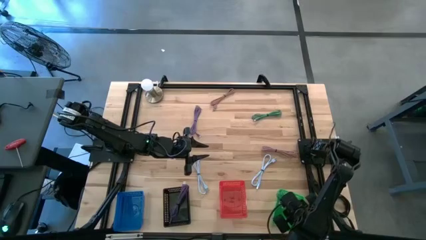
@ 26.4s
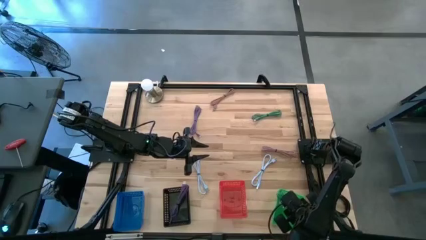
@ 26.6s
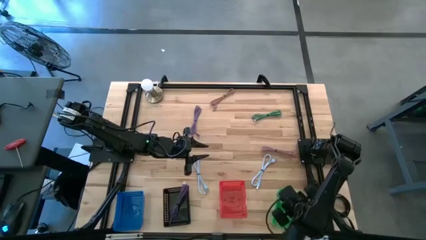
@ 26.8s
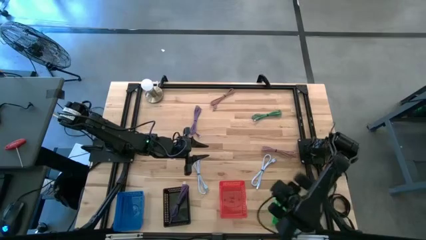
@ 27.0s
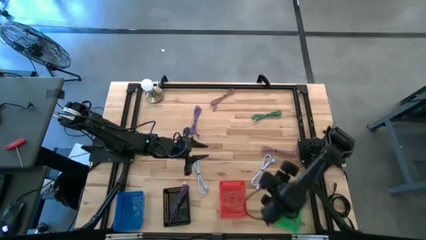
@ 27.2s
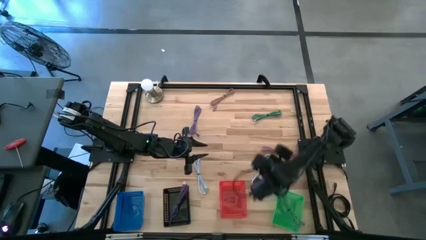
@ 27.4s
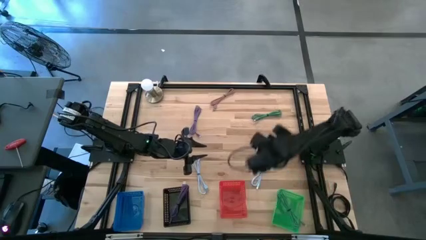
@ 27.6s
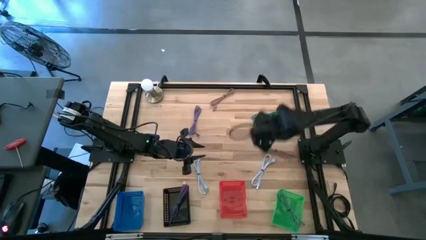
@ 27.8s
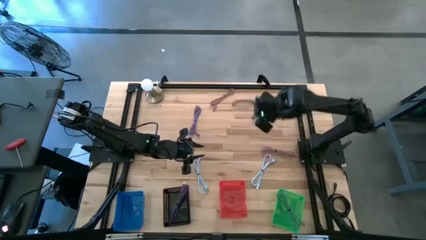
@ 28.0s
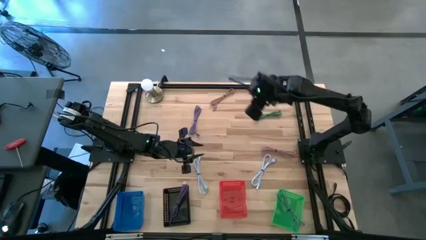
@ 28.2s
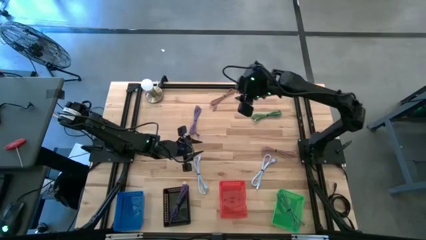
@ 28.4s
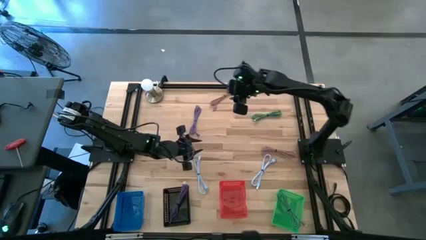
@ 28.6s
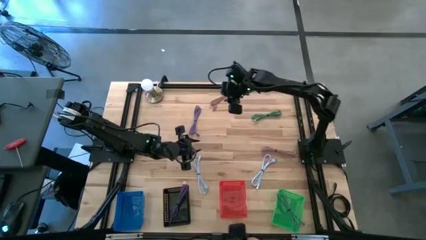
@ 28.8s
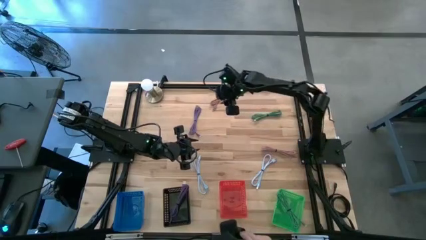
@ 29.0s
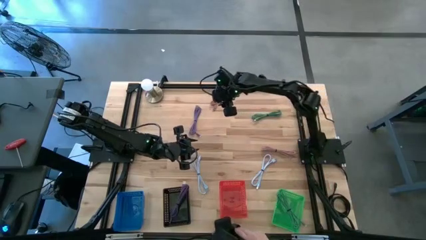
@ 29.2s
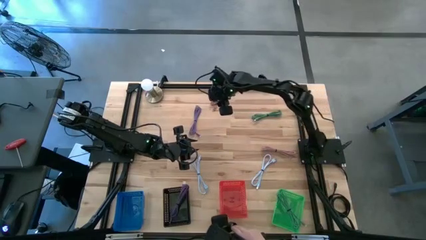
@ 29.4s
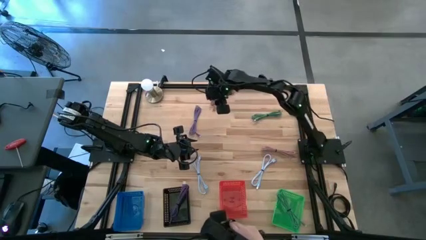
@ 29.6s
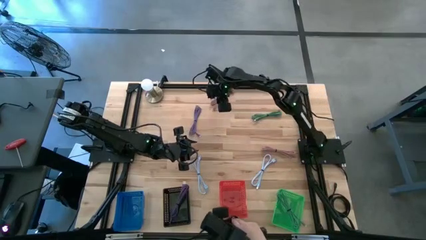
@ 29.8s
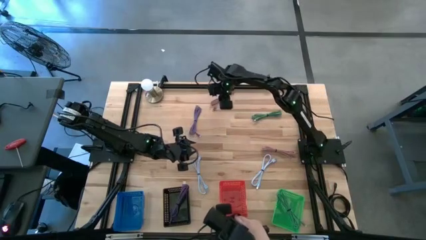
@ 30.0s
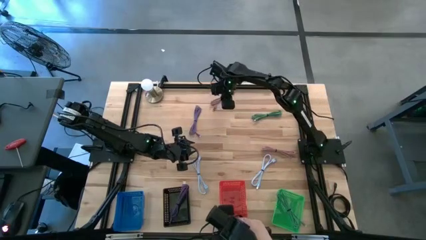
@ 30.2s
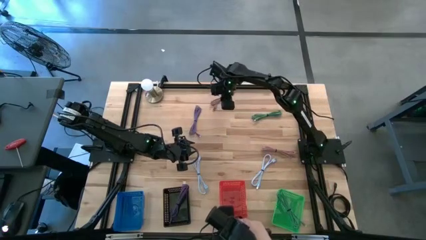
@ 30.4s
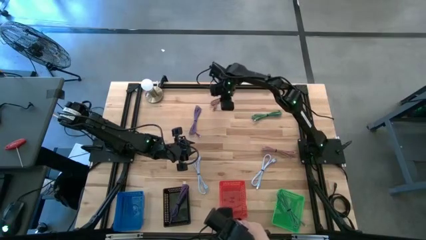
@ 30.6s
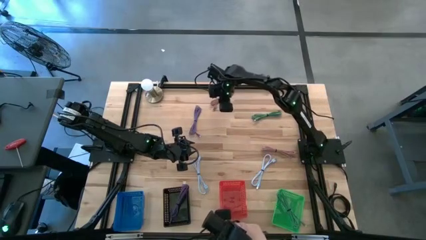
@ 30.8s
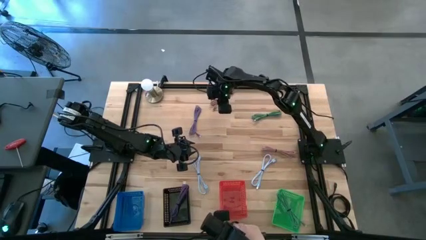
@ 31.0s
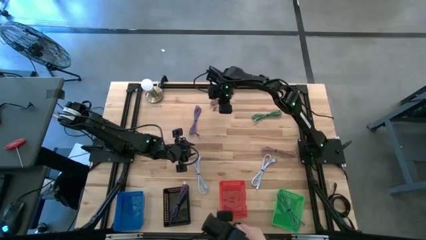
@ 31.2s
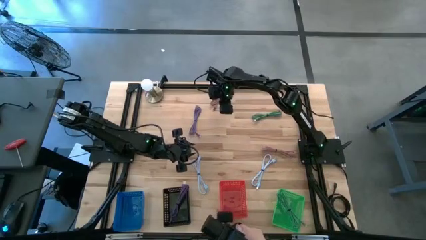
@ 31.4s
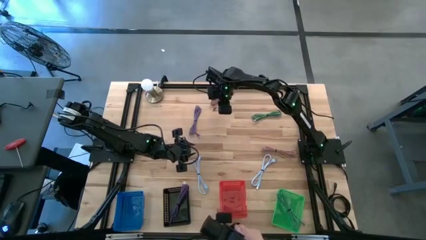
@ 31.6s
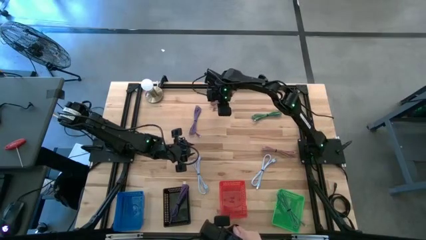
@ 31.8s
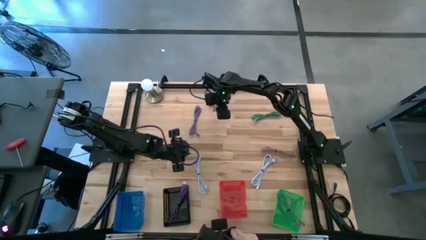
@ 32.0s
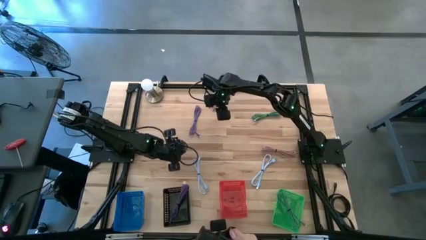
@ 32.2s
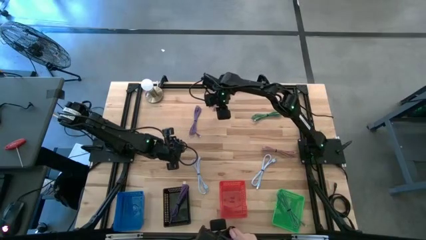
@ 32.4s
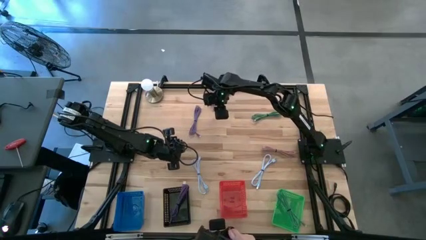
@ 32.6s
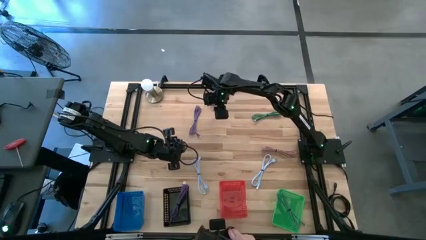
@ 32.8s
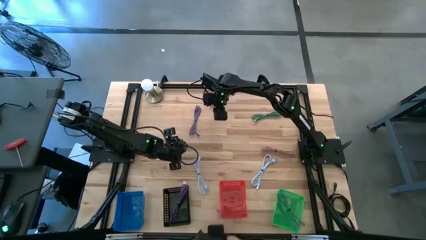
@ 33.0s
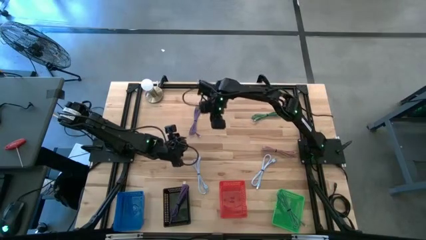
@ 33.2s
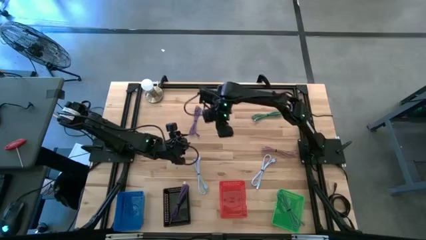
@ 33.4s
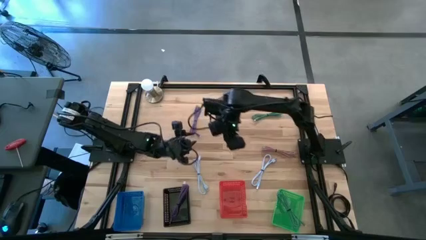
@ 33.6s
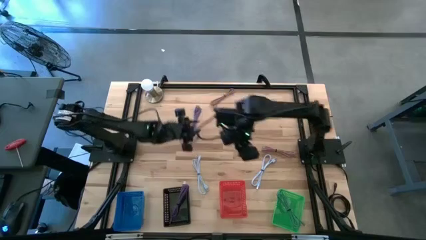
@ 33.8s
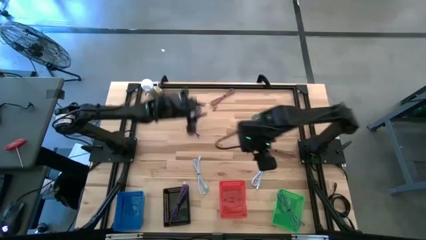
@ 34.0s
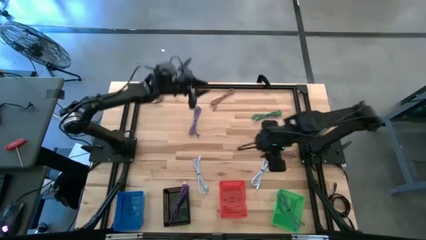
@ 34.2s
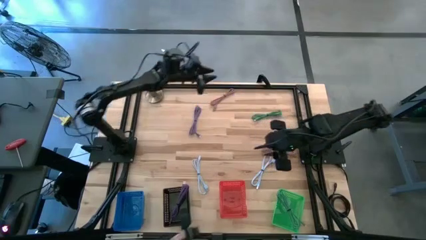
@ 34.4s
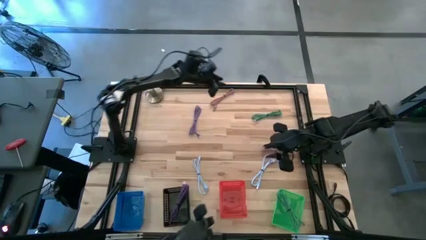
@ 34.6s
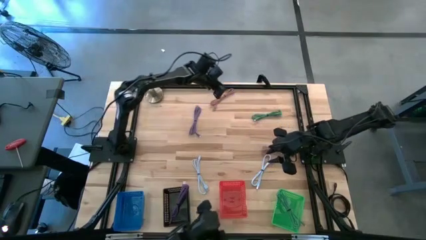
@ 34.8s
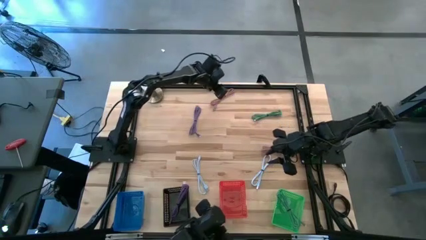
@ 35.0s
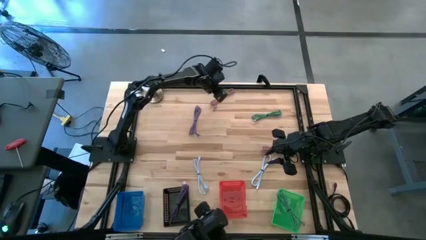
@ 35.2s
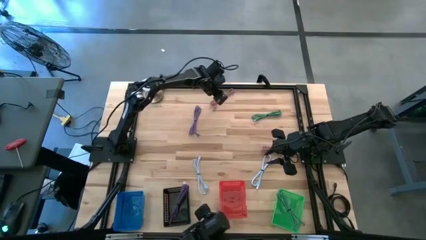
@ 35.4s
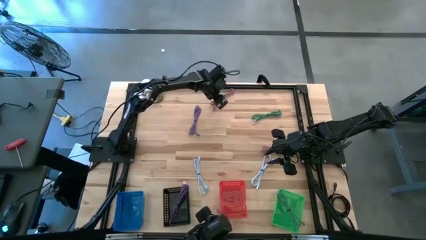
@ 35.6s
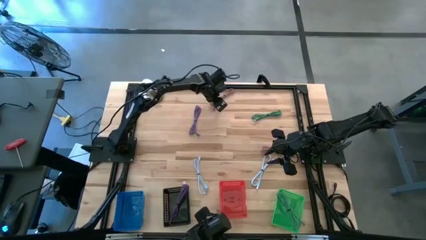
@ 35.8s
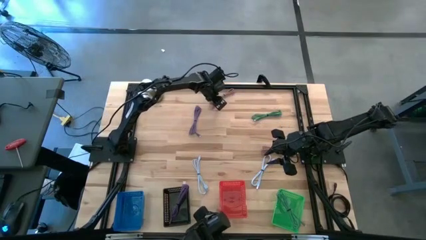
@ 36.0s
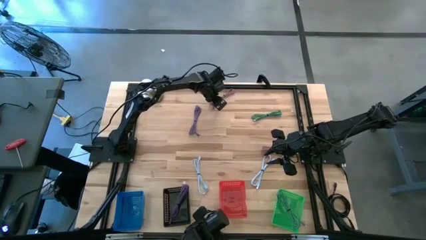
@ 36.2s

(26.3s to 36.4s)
Task: Pick & Place USB Port
Put the top pink charger cable into the red bin

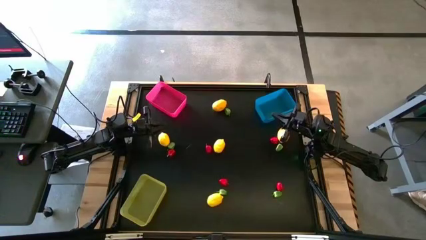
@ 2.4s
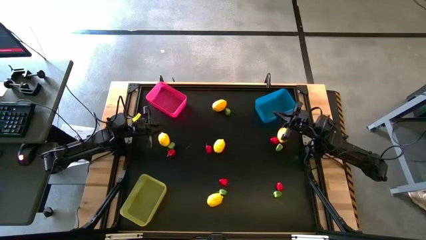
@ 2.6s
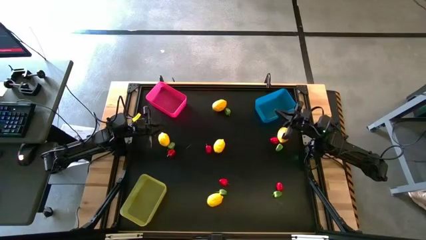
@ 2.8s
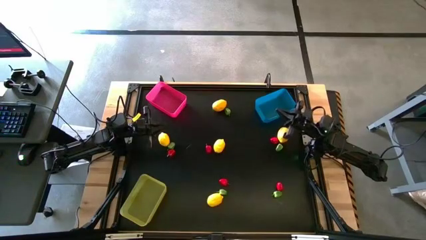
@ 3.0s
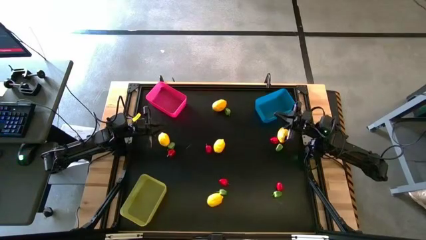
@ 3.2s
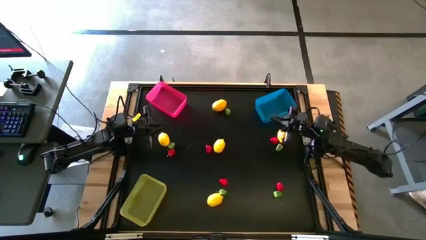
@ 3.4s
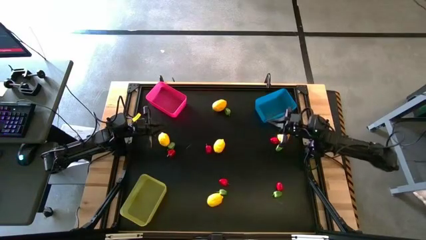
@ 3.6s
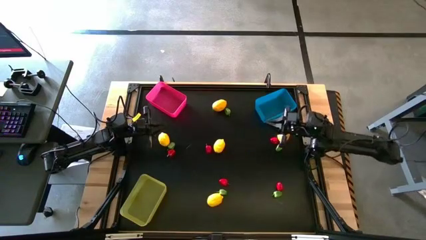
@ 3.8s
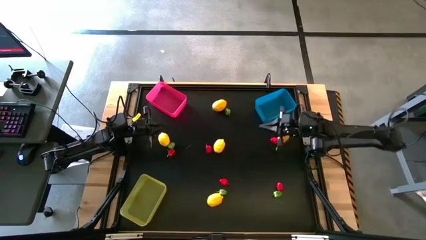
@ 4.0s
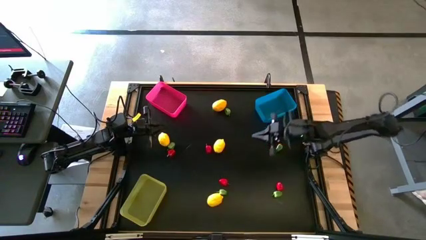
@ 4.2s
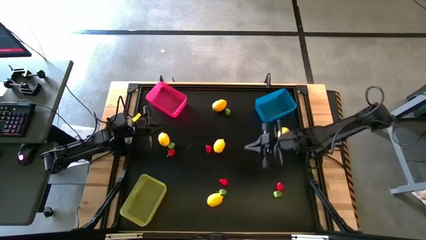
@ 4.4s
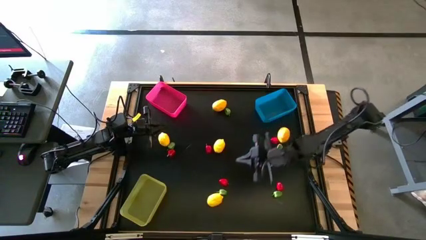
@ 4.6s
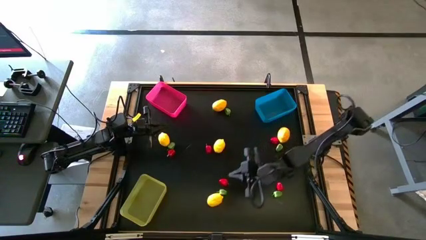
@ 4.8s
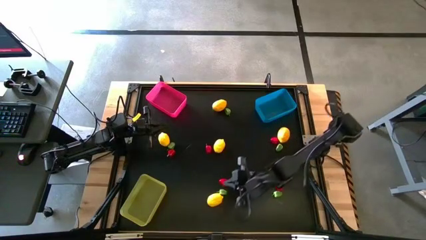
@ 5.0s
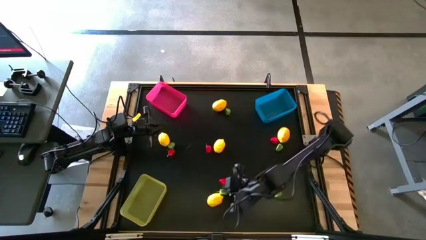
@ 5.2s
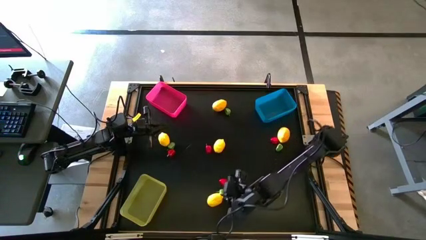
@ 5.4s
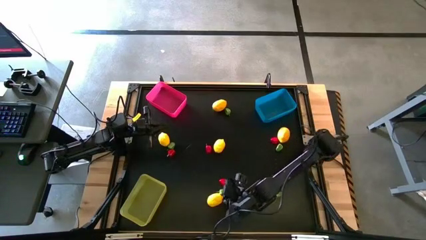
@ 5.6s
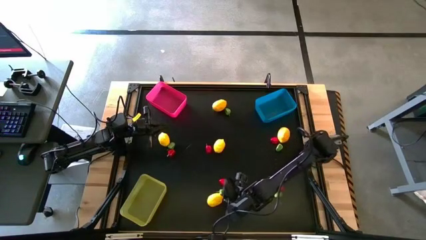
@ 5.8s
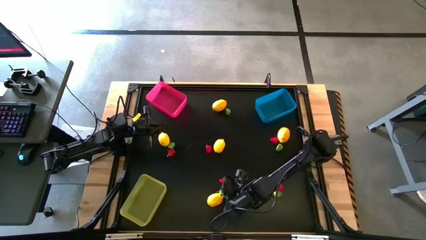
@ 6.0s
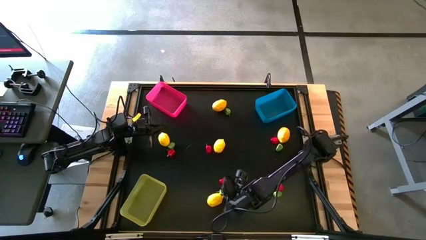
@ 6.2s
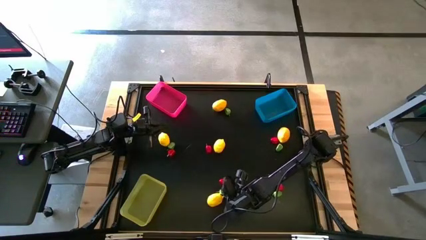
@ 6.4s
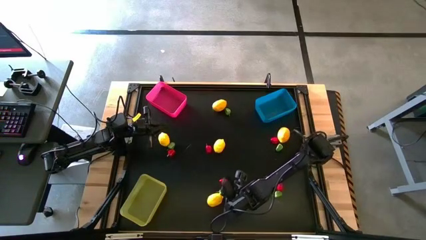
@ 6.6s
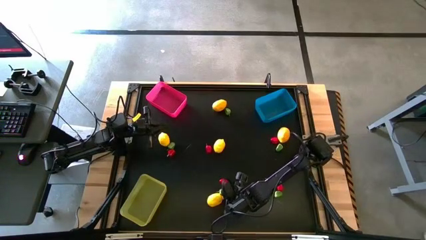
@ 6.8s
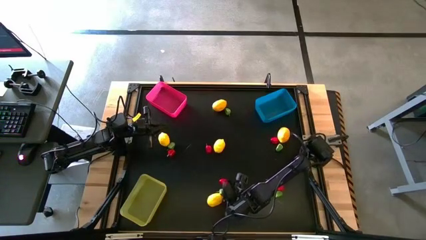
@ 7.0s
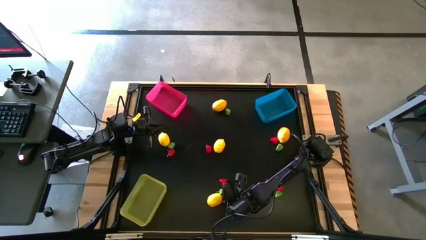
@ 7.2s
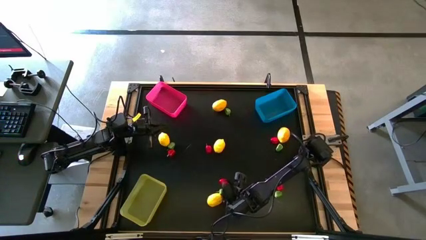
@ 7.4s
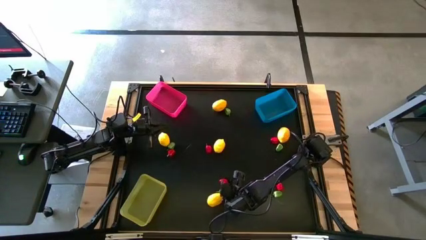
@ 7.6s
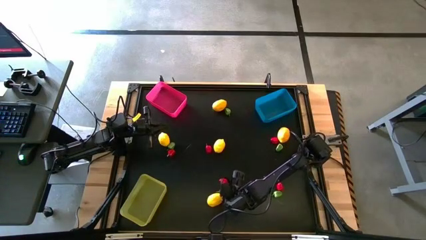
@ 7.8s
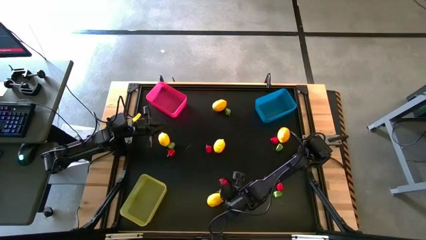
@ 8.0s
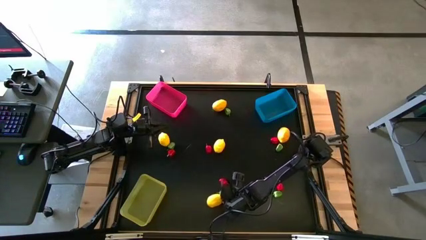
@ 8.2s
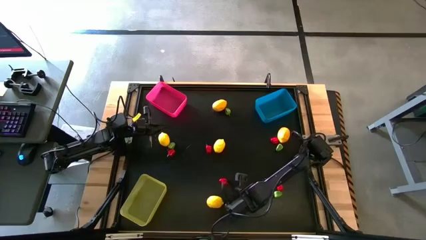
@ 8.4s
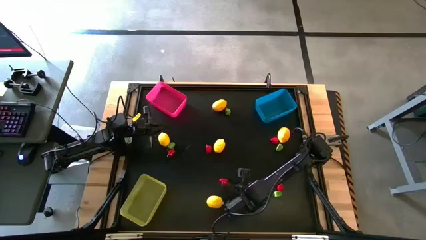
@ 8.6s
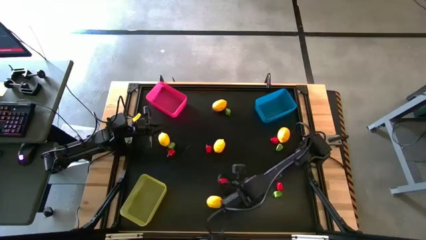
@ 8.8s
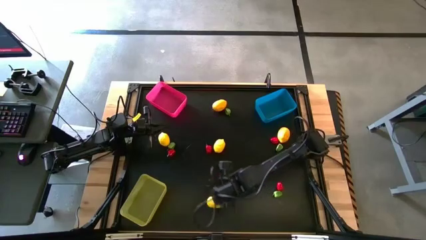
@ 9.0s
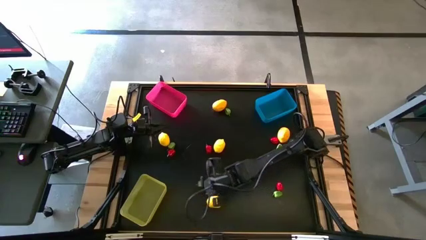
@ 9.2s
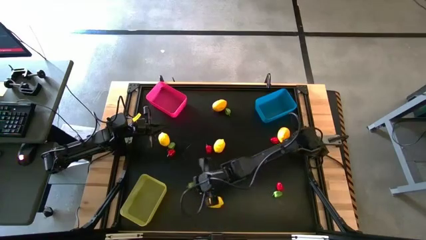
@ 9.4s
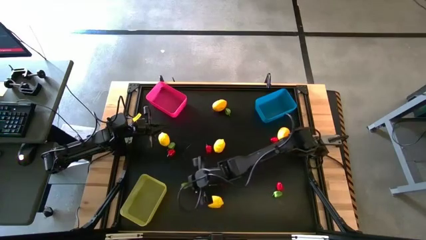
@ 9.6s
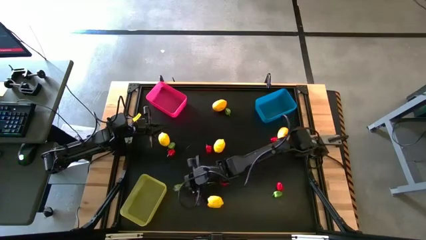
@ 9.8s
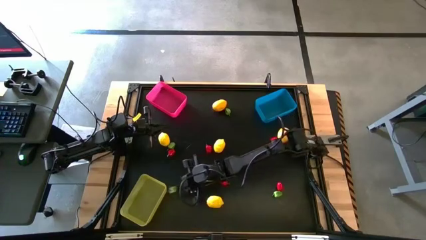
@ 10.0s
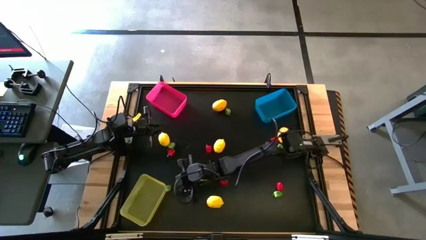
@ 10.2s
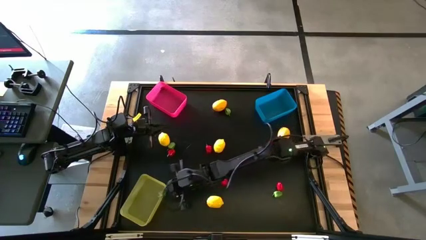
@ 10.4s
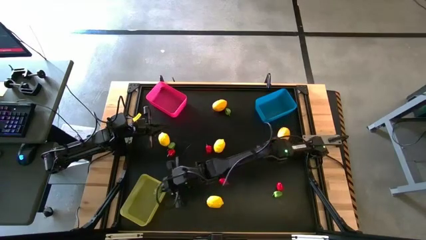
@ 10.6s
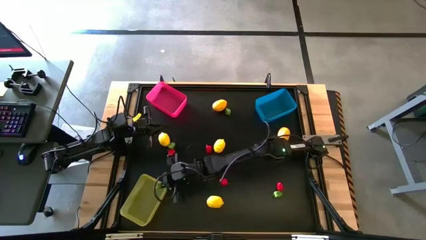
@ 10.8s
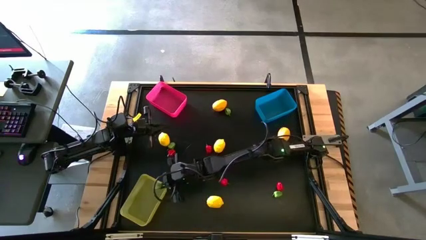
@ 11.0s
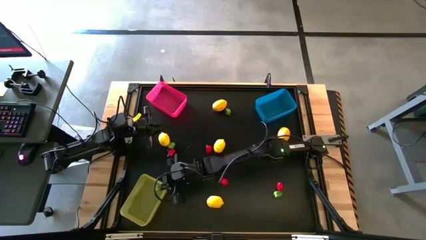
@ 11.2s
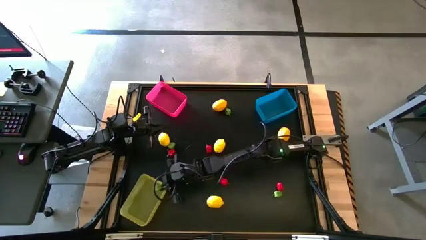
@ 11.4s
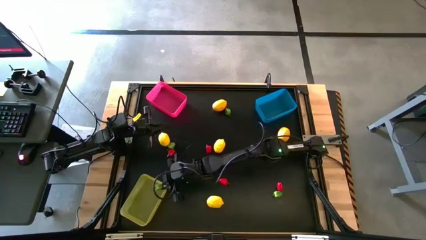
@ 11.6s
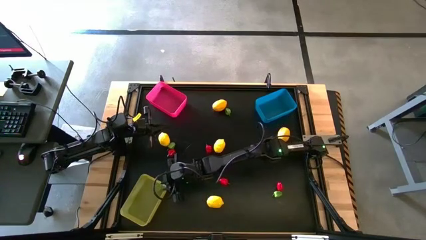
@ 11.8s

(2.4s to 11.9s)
Task: Sort produce into baskets
Put the green bell pepper into the yellow bin
